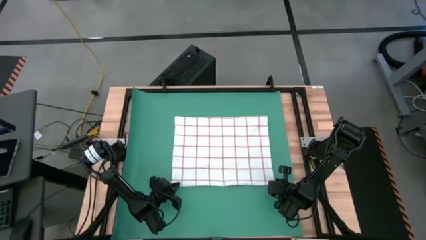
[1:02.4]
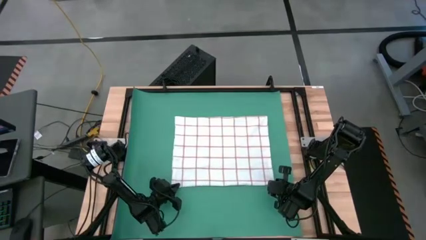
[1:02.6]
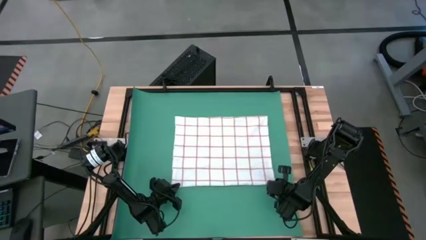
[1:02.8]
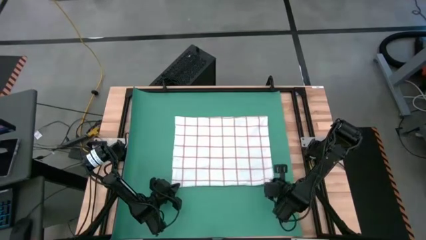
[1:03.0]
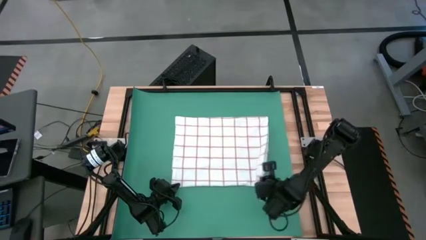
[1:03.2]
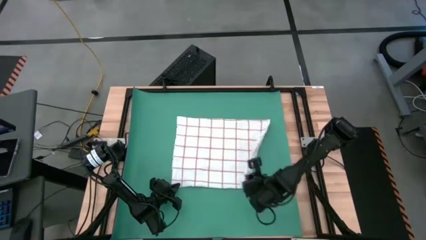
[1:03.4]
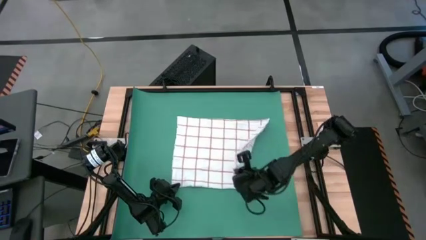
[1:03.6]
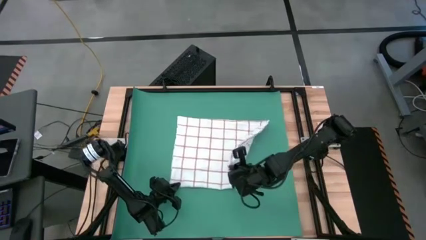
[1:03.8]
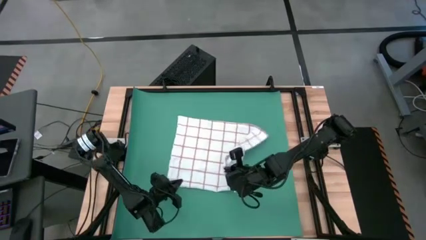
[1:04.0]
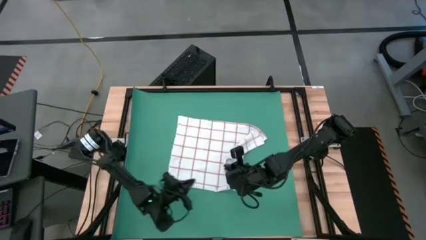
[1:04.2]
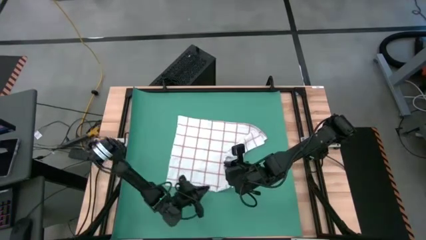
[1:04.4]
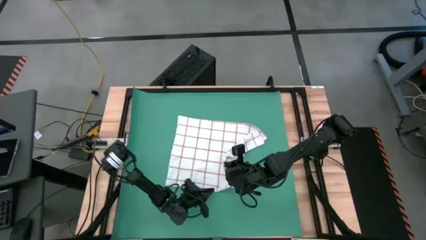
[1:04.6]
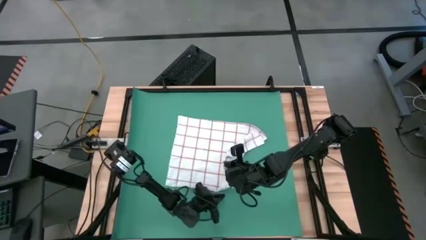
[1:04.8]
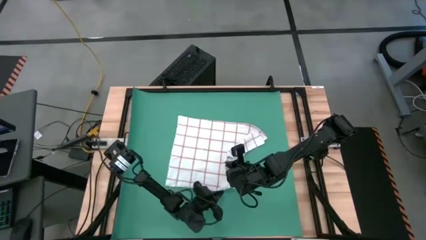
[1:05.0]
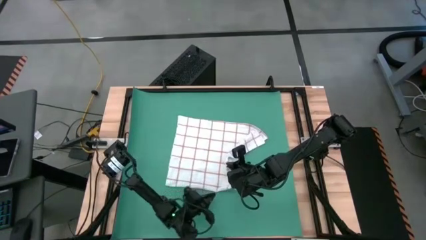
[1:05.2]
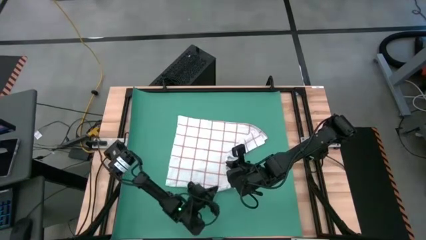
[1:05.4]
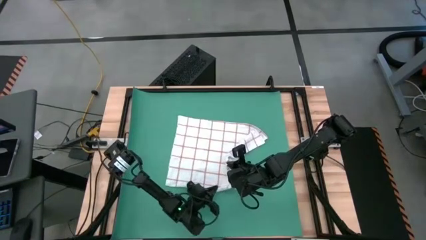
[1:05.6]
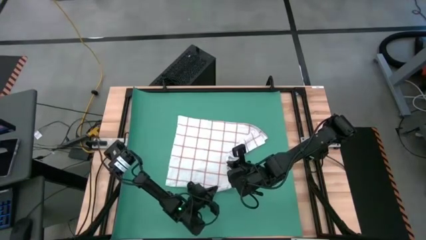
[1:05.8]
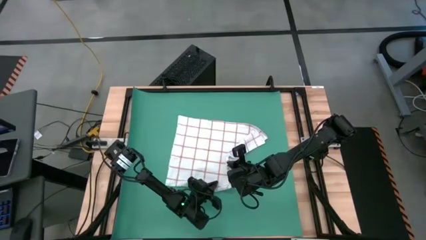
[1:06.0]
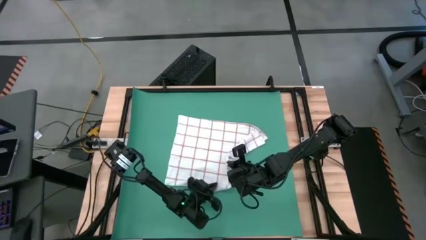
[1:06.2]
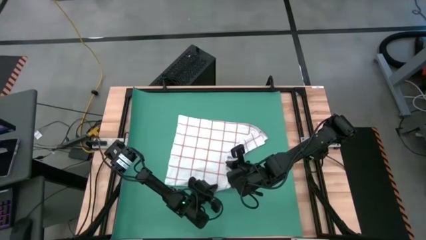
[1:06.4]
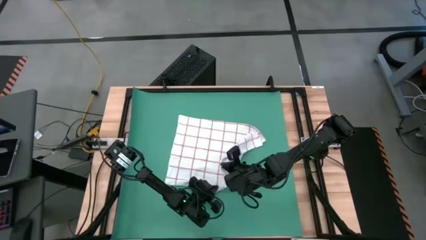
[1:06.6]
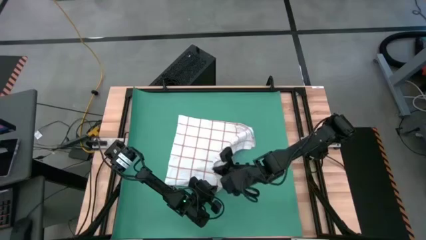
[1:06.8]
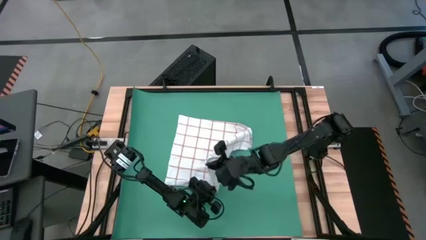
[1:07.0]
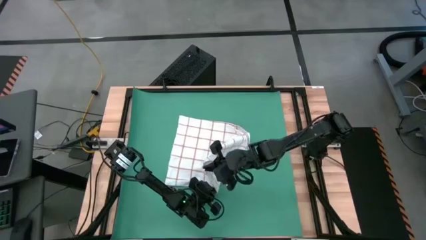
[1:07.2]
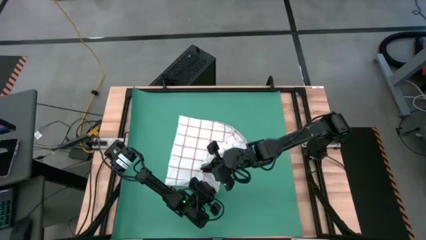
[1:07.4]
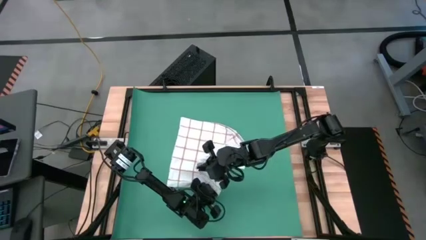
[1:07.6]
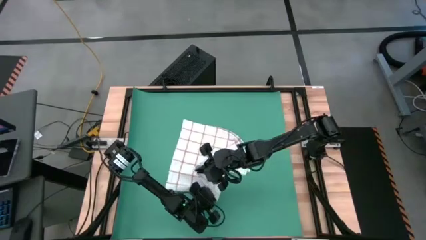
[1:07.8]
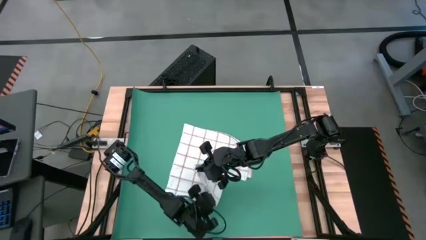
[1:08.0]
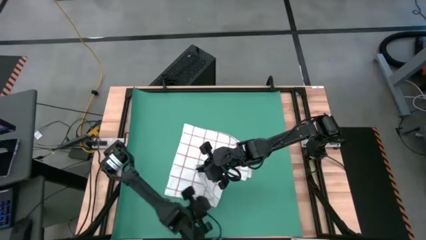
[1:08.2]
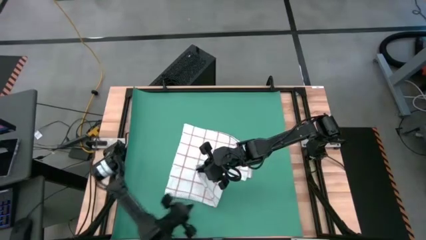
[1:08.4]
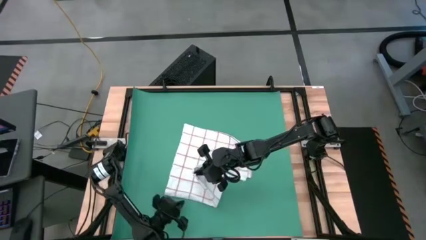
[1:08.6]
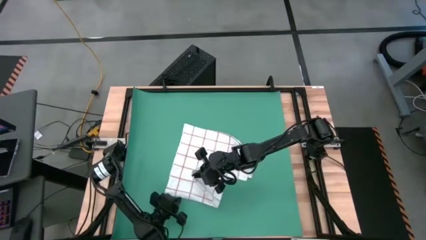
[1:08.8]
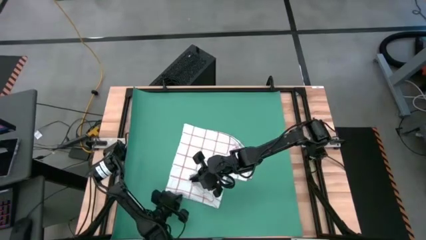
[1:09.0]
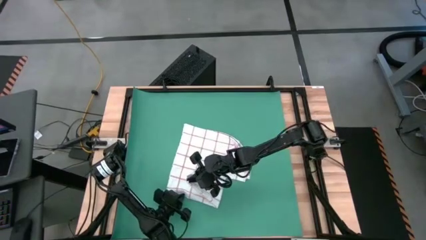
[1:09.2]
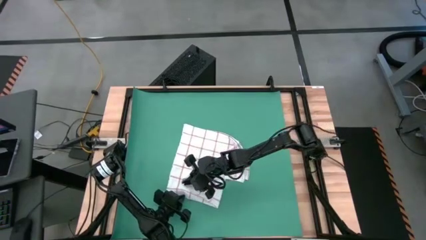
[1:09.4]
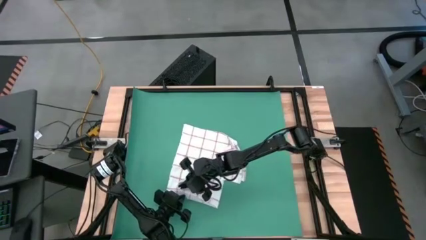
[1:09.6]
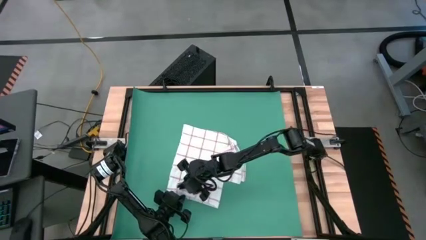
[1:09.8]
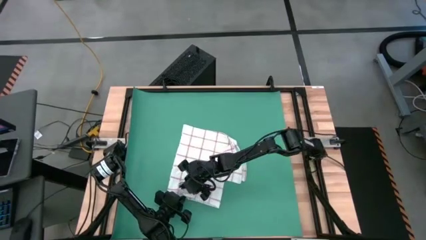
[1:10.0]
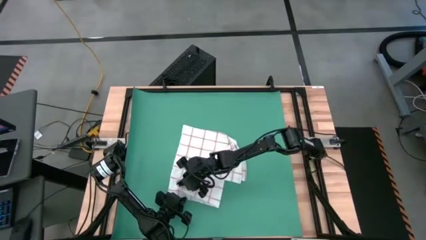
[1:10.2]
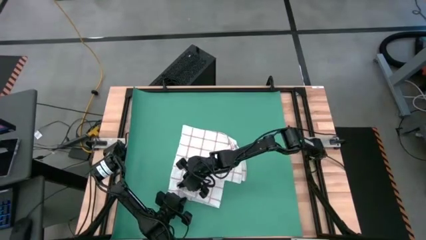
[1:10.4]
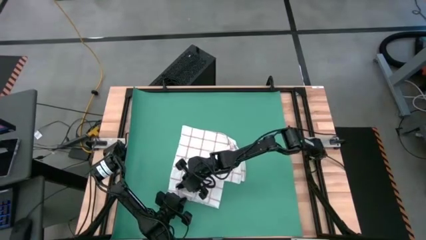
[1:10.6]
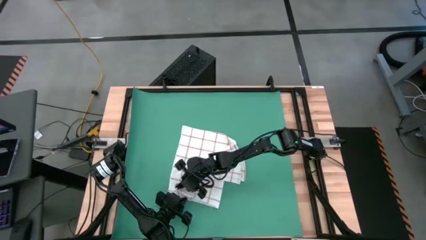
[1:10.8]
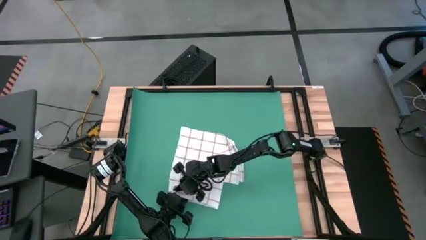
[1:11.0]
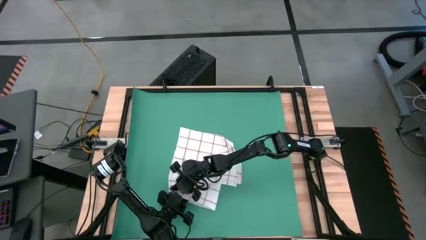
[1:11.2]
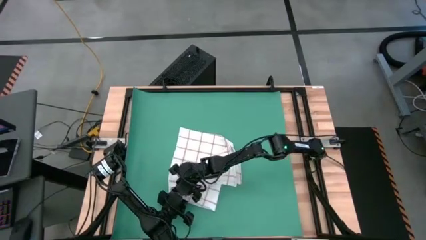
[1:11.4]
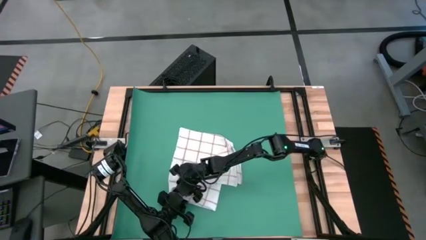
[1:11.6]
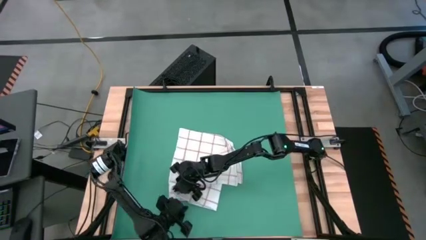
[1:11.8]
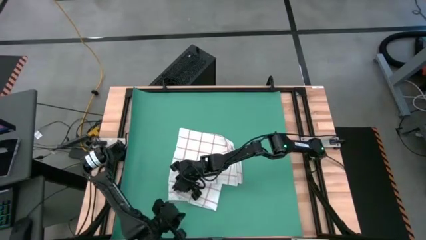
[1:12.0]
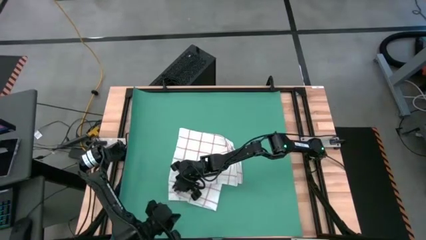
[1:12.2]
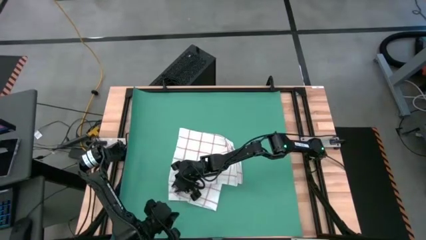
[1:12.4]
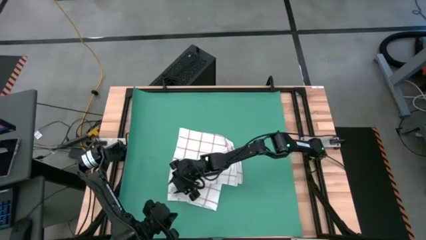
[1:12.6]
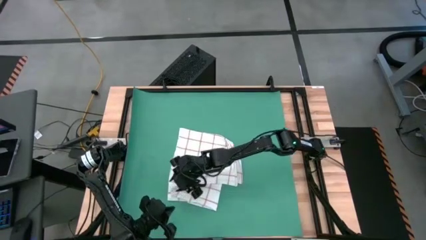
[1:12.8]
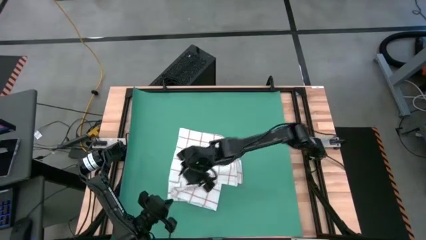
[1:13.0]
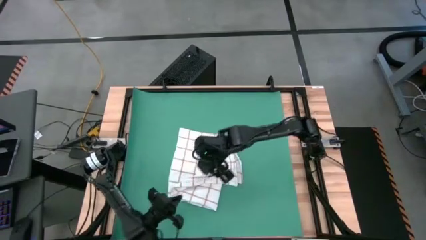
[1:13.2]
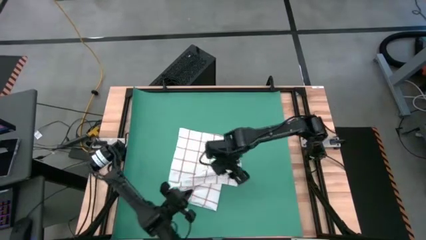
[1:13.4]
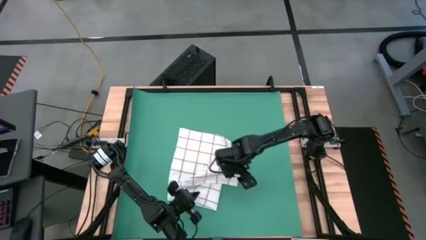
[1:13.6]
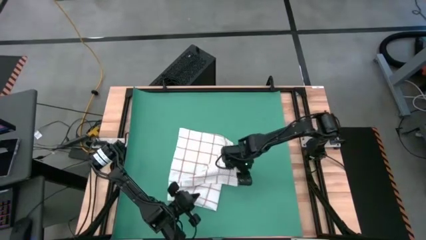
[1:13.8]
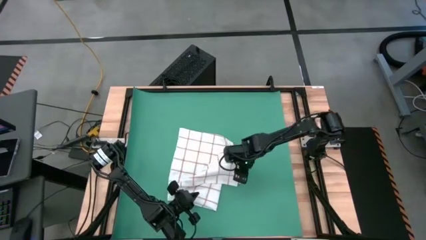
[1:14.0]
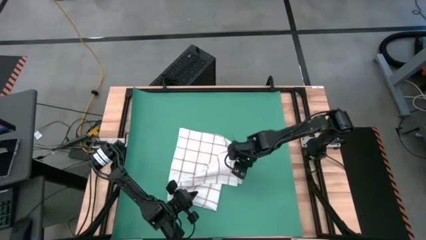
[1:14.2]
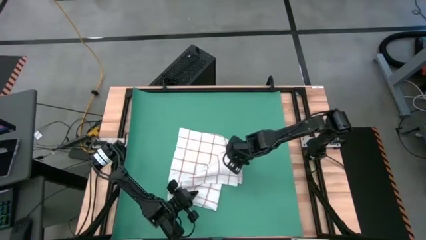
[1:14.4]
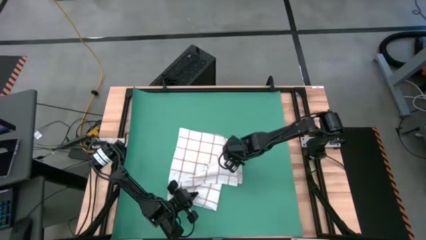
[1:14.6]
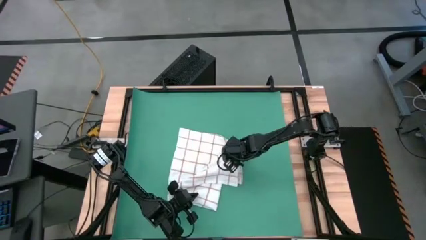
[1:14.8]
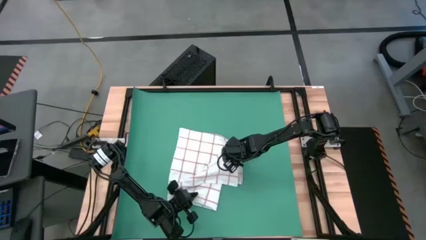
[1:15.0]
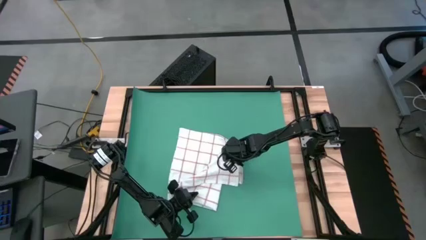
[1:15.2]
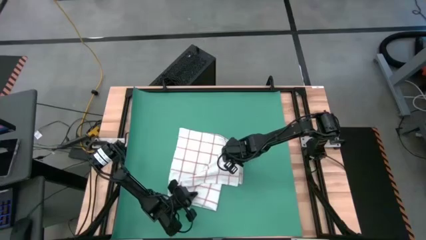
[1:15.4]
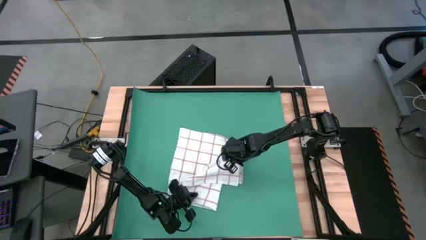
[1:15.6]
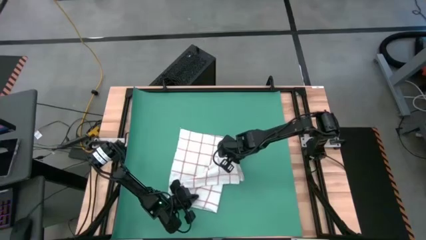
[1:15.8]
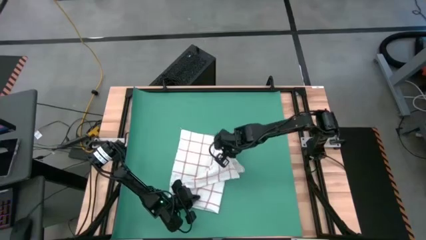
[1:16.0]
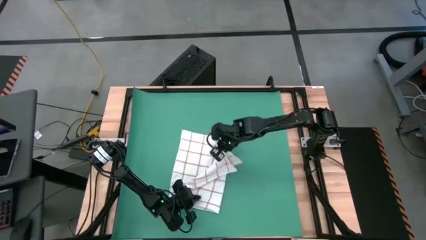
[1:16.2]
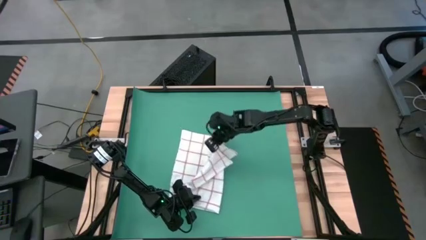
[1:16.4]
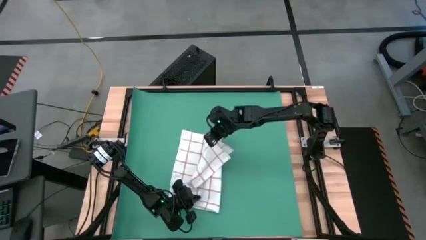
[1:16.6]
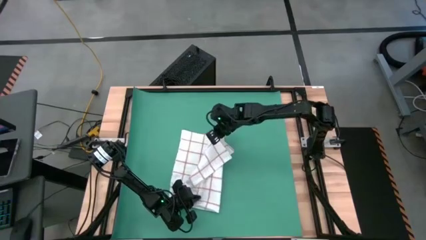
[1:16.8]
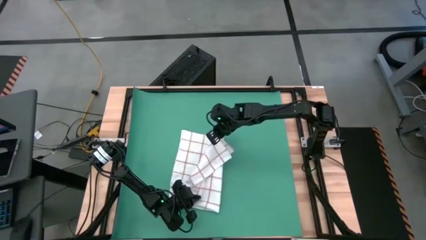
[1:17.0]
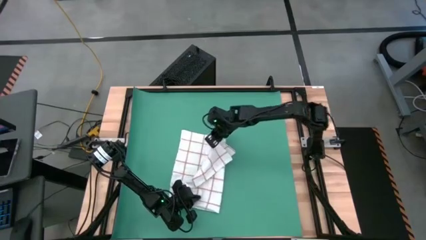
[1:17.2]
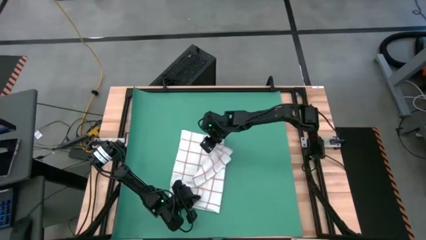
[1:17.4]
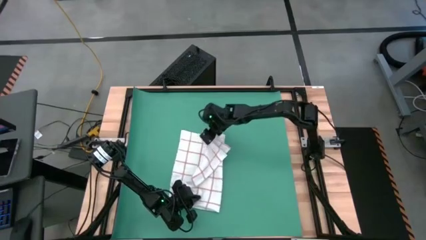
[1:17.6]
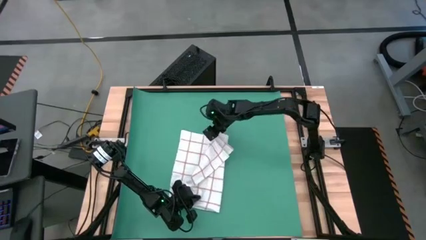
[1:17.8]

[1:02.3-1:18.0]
Task: Roll towel
Roll the white towel

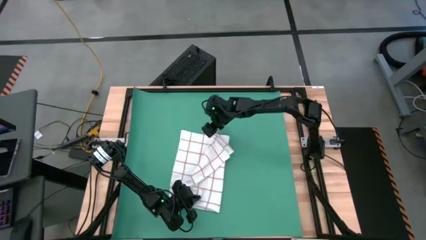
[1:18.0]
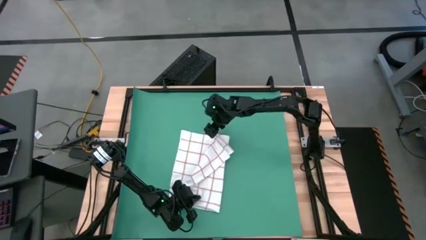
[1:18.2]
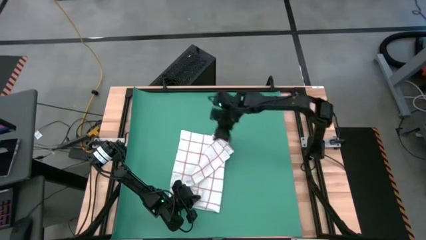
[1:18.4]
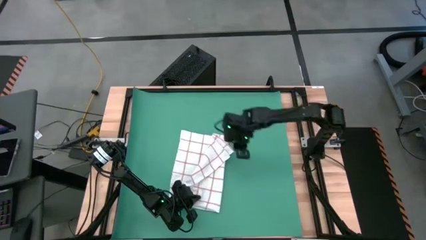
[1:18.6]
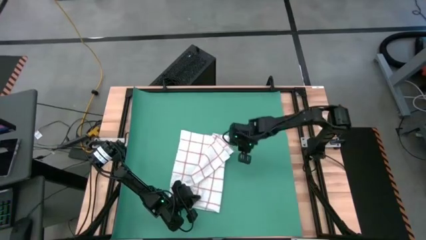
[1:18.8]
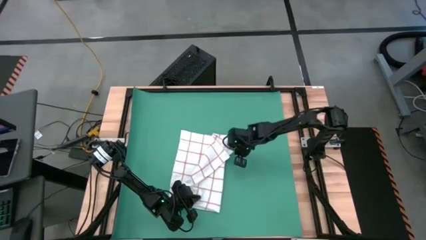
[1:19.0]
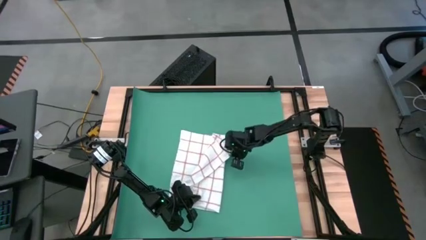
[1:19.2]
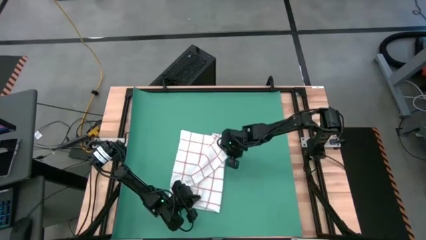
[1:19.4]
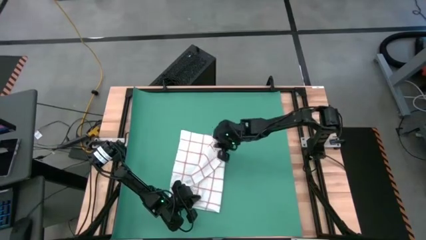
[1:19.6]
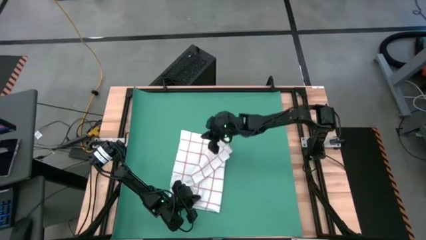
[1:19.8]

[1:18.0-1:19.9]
Roll the white towel
